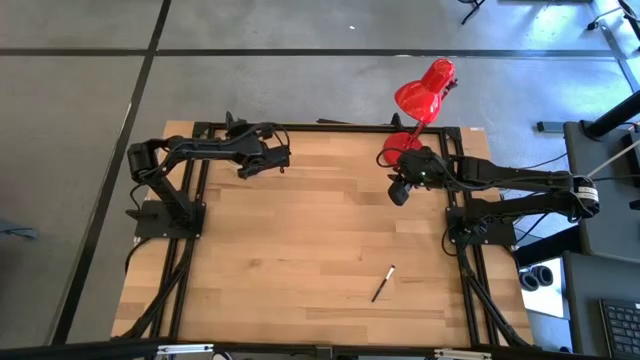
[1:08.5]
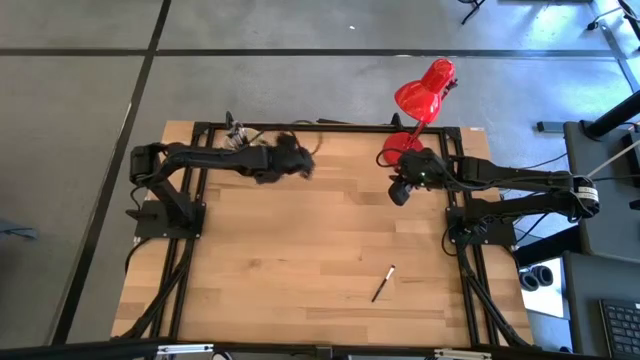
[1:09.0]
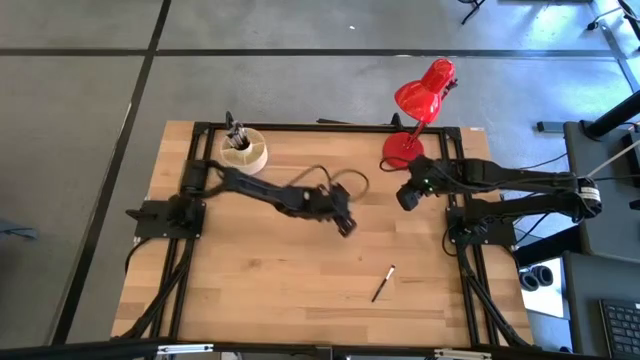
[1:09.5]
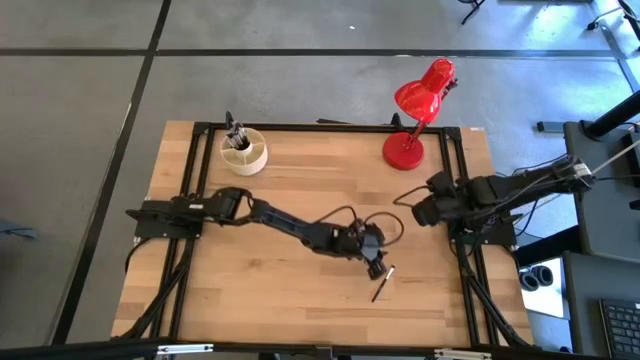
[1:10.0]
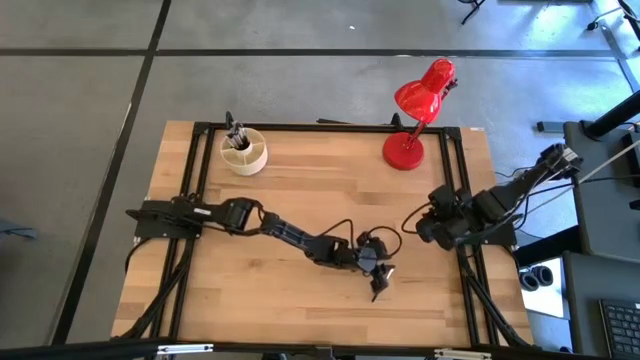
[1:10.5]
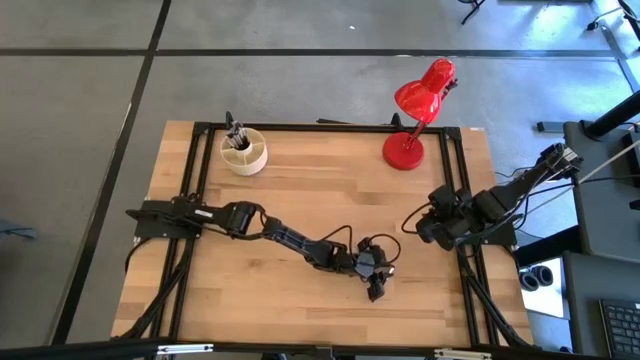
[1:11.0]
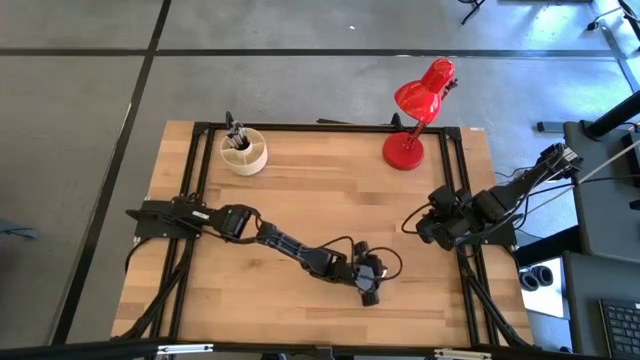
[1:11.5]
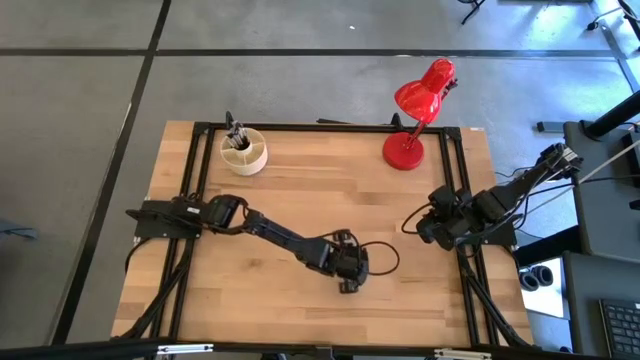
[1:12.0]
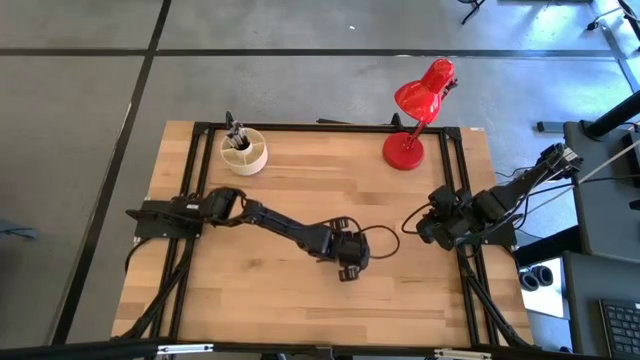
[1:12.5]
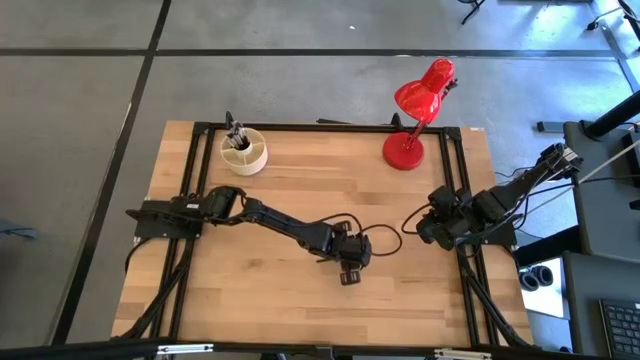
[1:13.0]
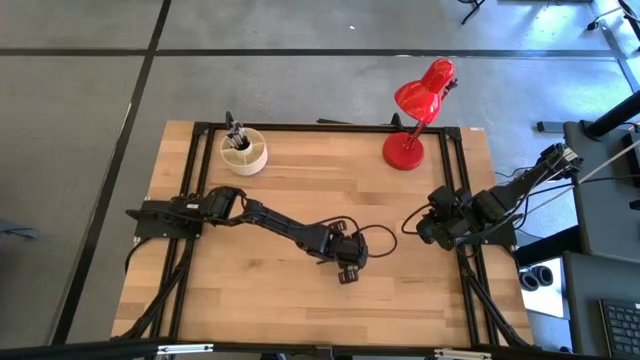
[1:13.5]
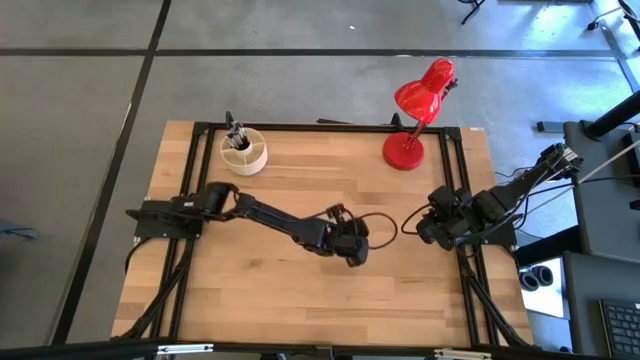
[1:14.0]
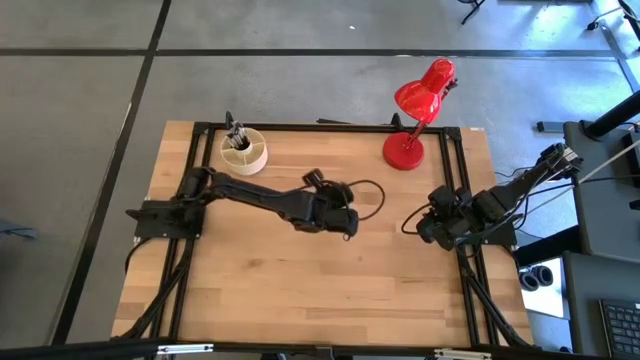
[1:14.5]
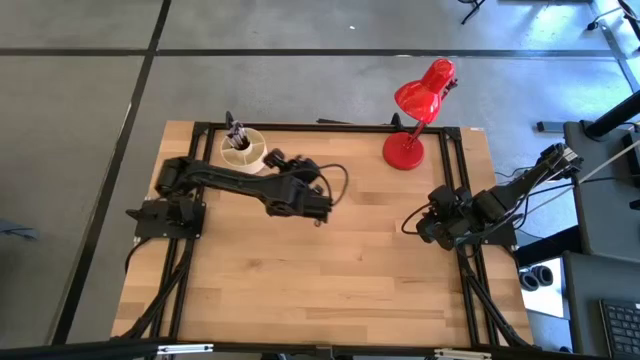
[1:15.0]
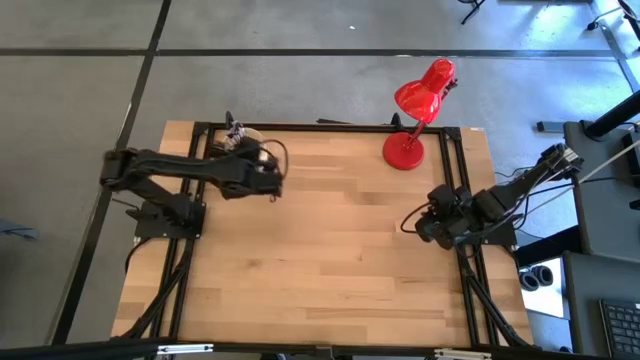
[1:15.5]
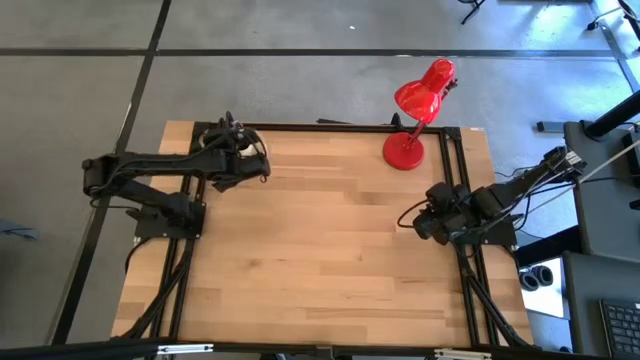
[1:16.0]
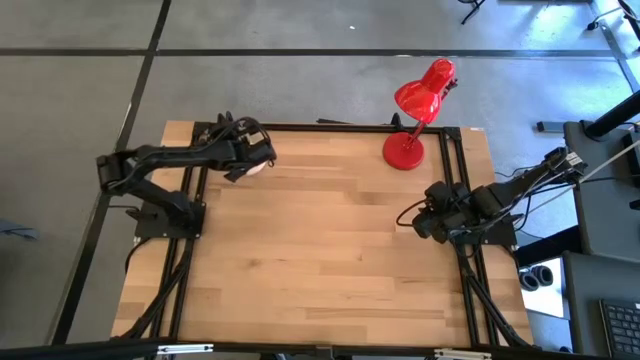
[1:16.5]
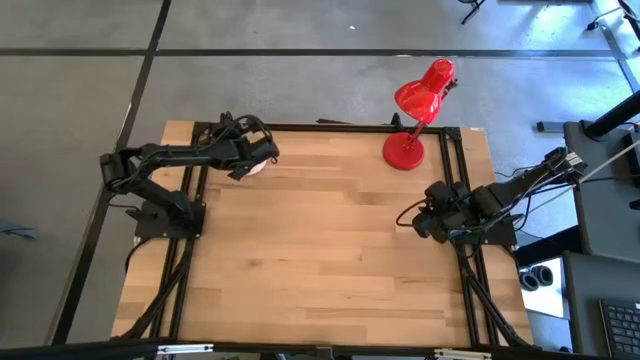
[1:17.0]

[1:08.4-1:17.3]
Task: Put items in baskets/containers
Put the black eyeshadow brush into the white organizer

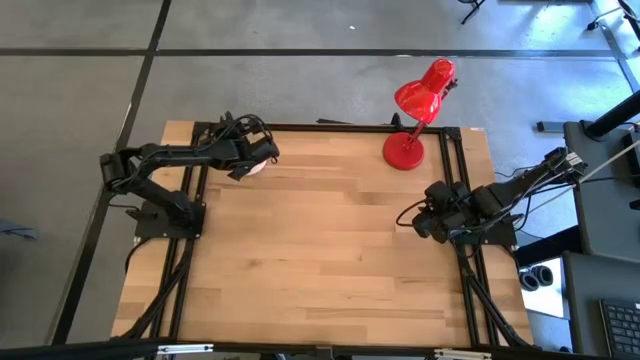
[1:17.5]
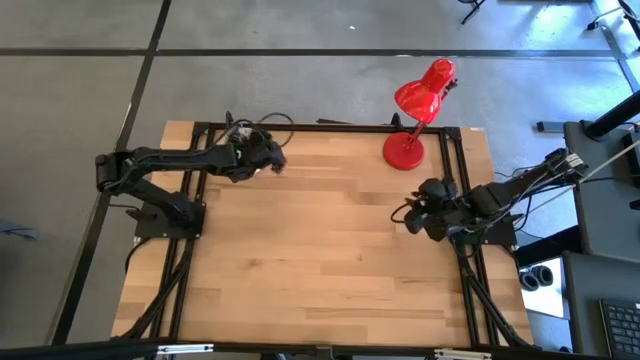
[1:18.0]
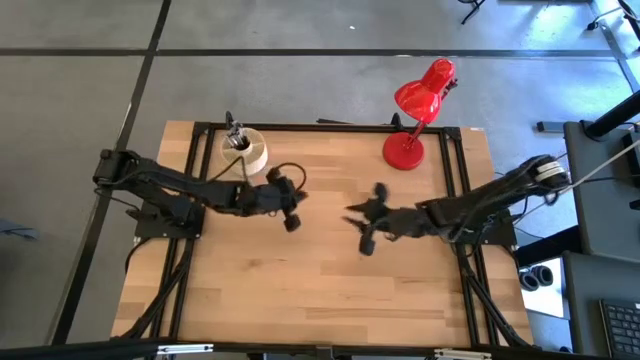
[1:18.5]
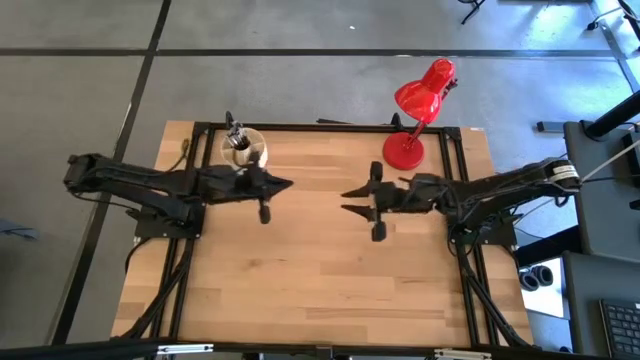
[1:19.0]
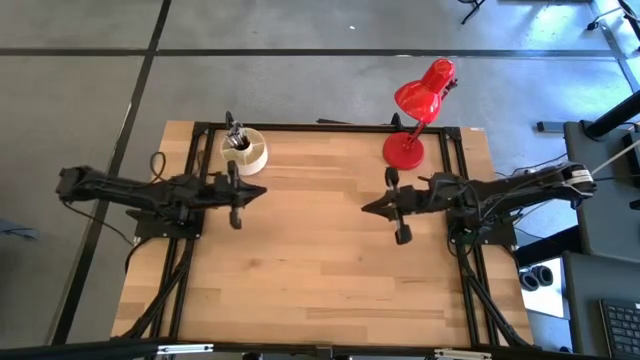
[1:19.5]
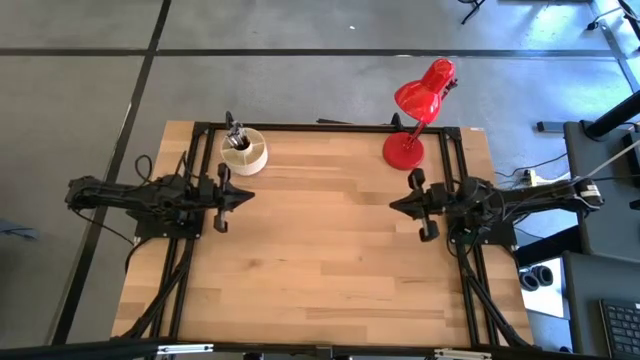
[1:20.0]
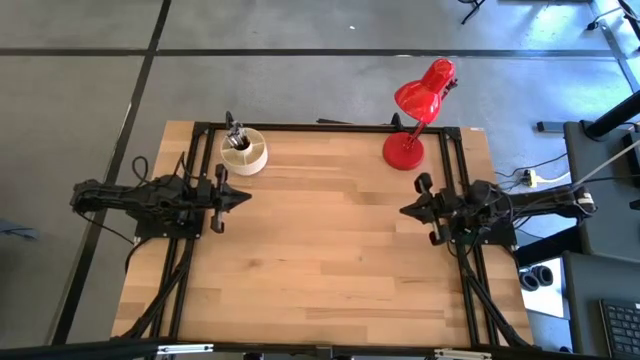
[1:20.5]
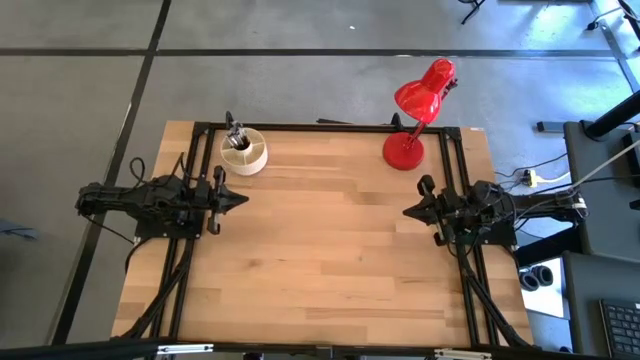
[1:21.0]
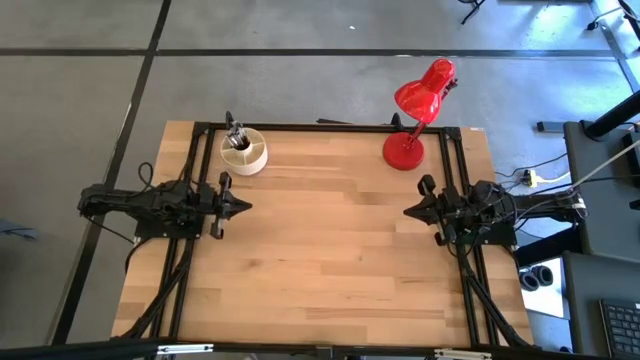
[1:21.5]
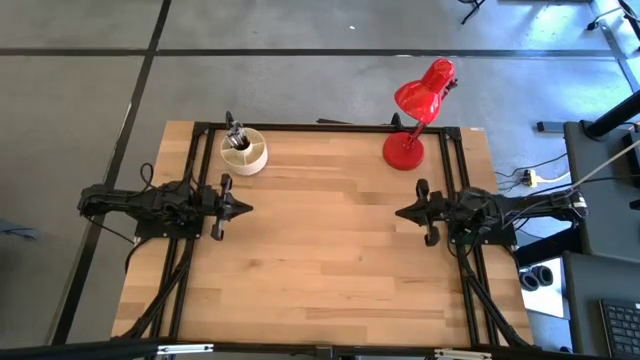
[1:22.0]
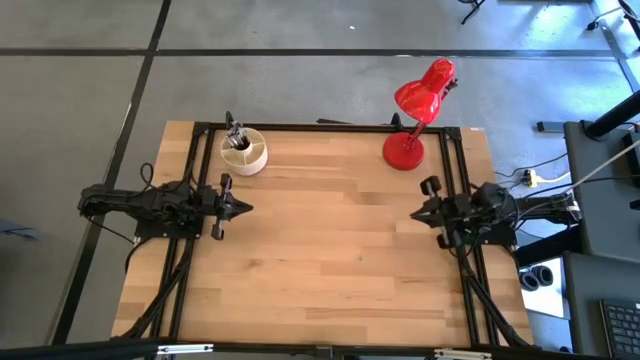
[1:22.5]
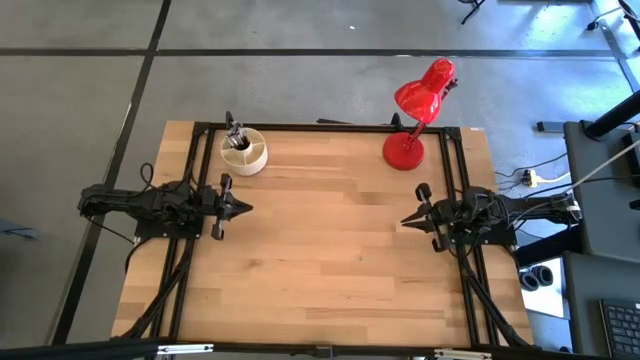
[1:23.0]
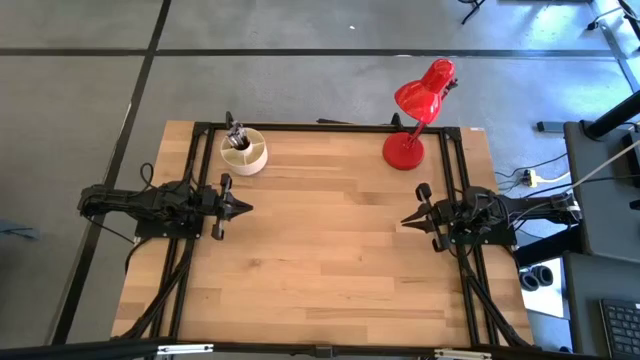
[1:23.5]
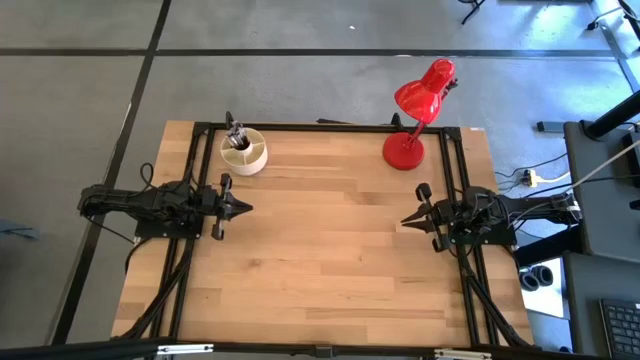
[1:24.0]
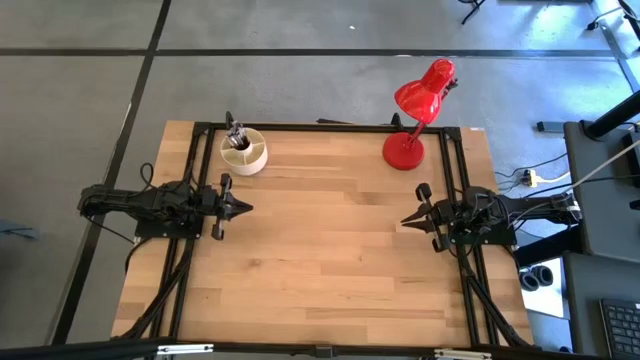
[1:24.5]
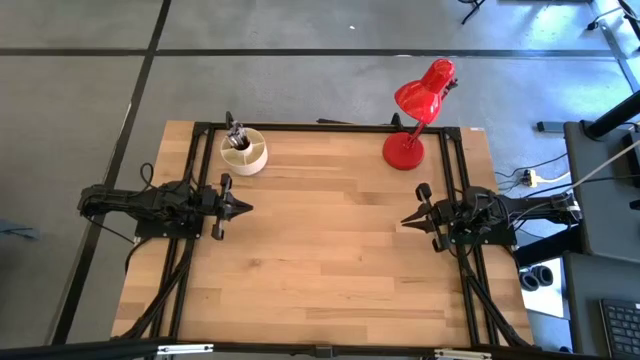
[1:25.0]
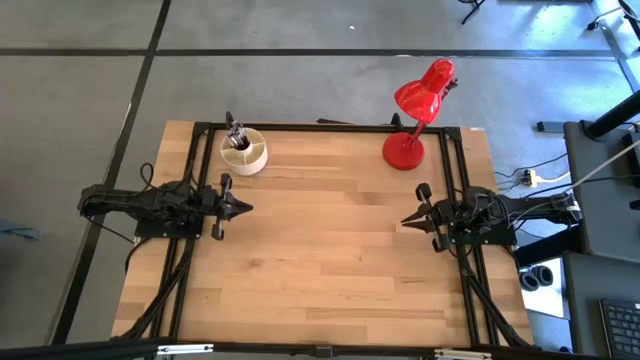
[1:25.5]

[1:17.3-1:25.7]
Return to Home Position

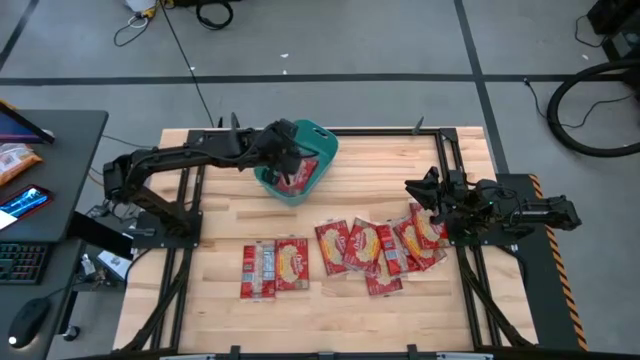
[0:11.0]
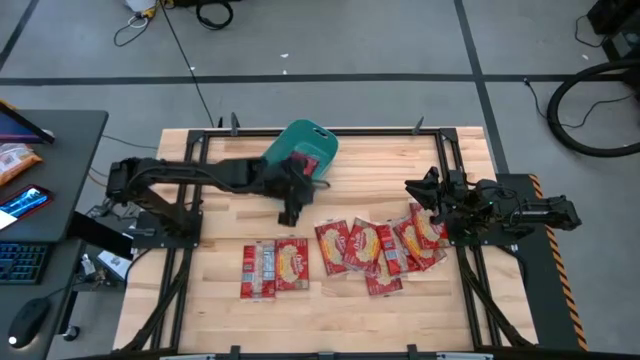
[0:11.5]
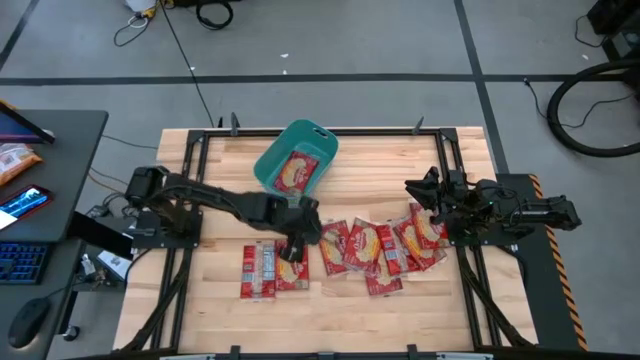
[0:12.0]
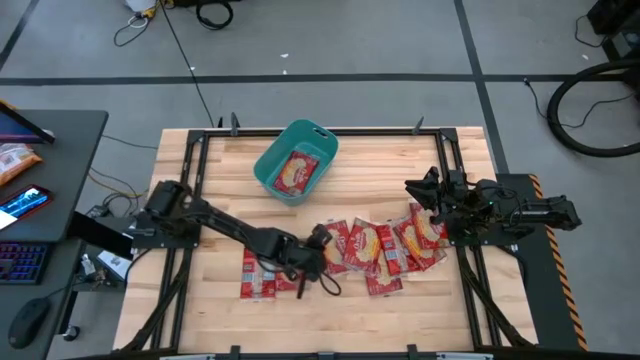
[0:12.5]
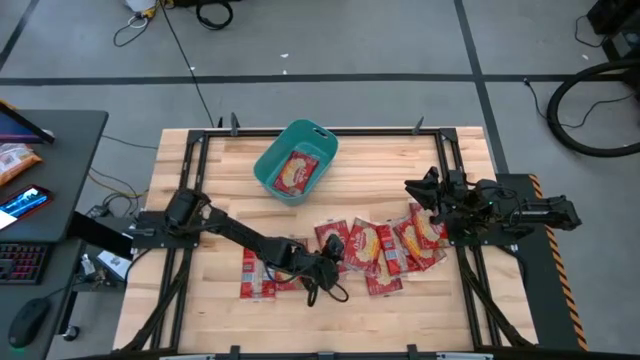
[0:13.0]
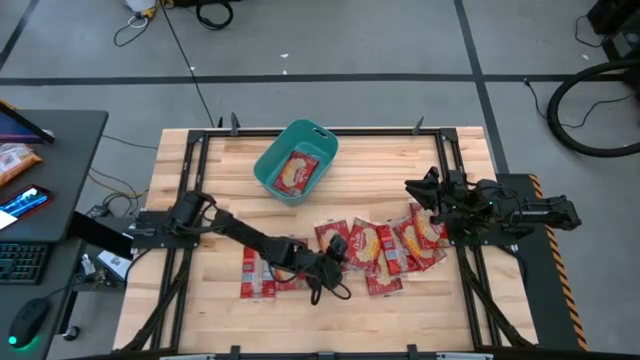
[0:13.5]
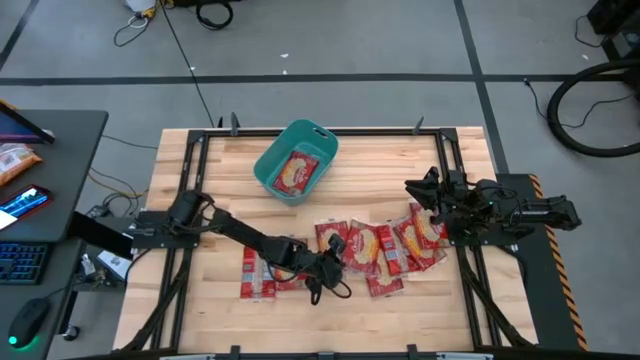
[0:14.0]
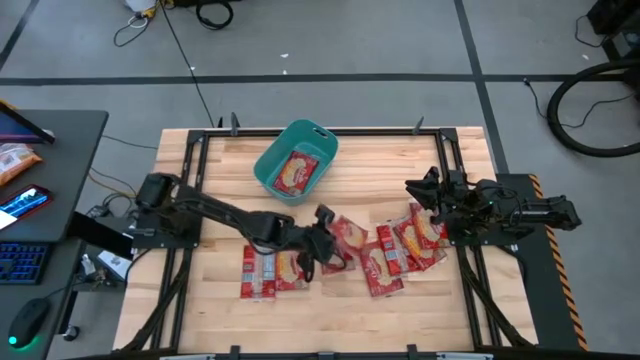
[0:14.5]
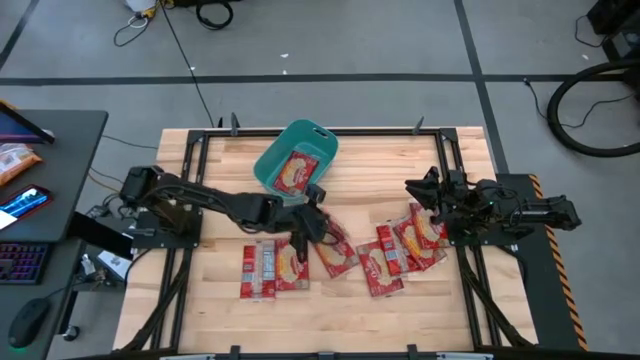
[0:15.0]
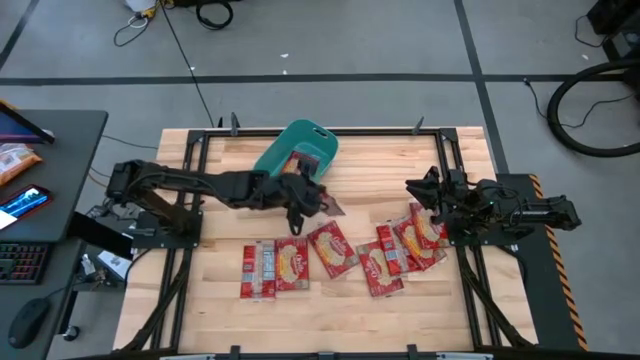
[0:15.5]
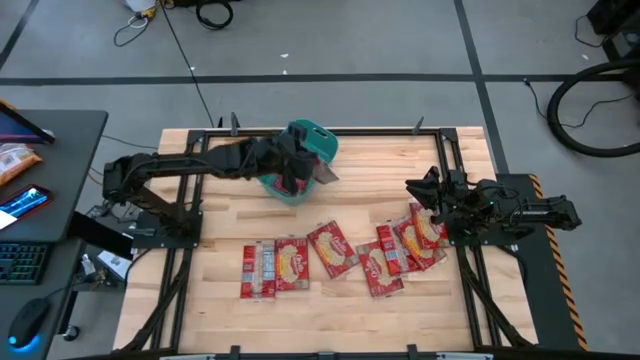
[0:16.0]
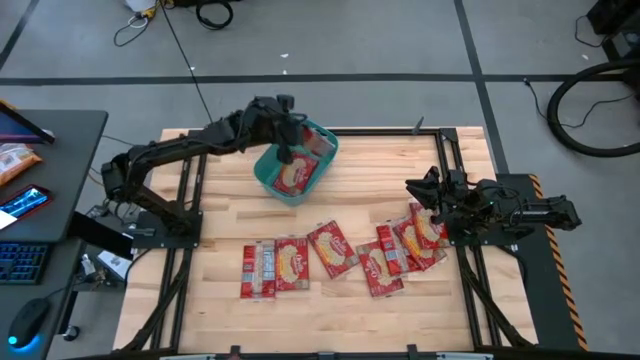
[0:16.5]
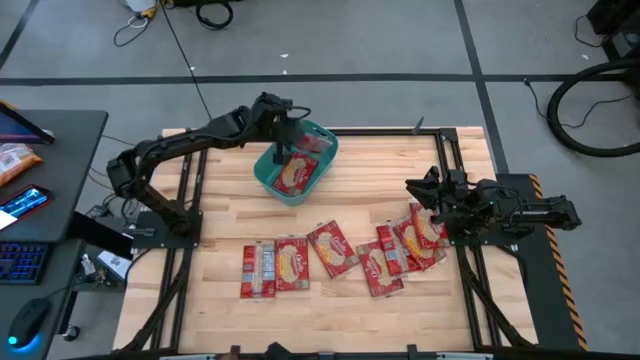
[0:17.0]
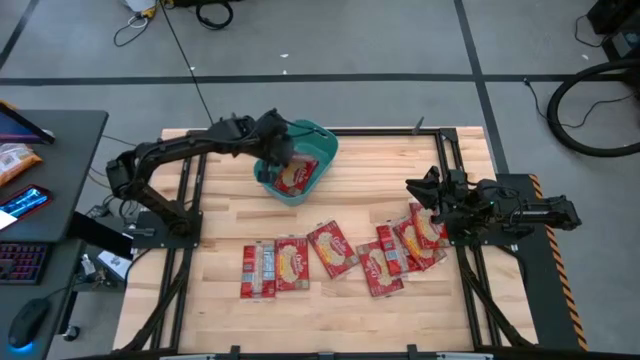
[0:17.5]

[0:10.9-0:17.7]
Task: Sort popcorn bags into baskets
Put the red popcorn bag into the blue bin
